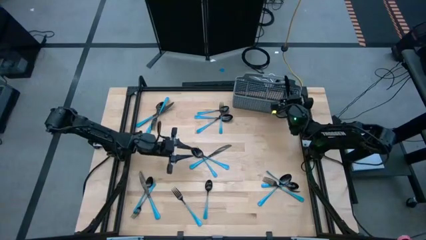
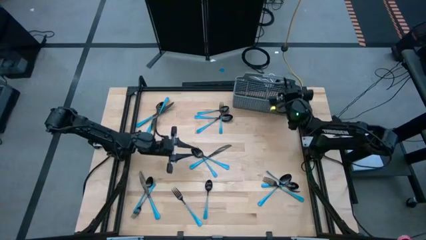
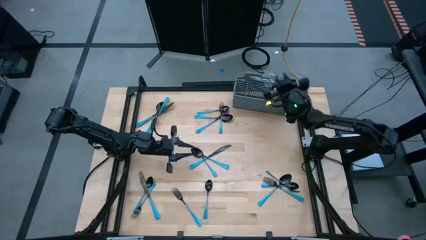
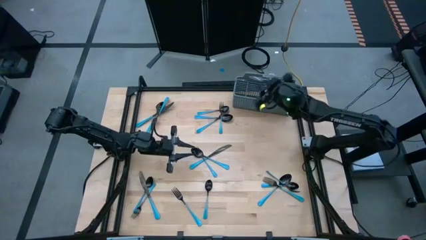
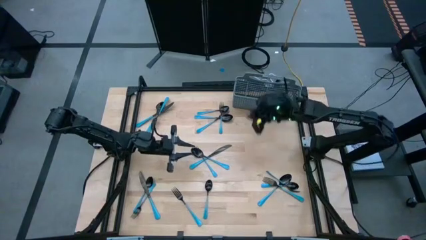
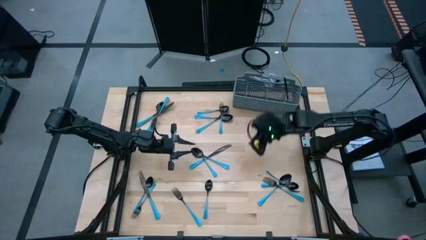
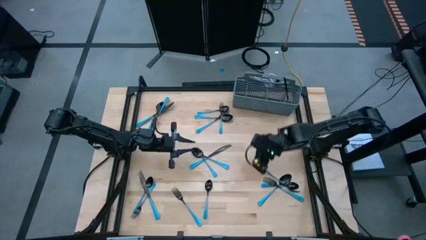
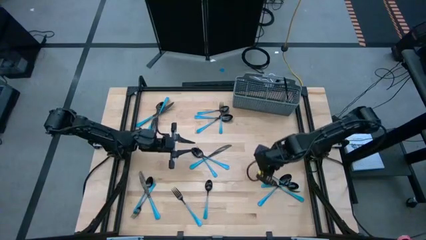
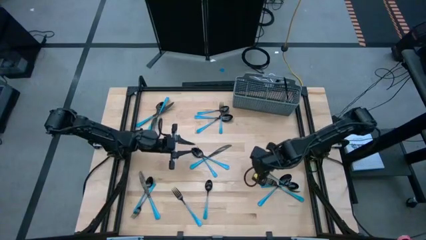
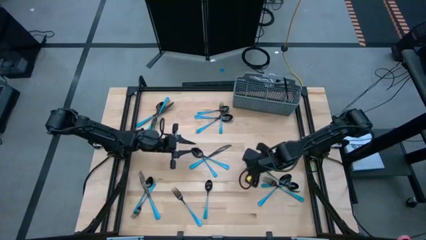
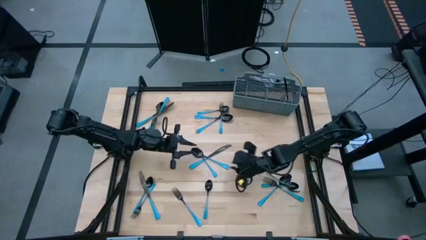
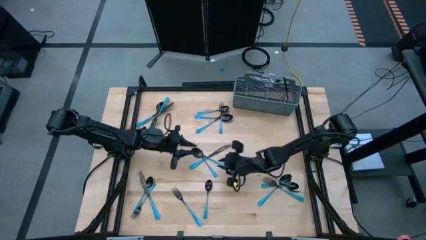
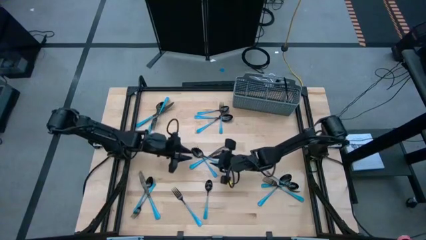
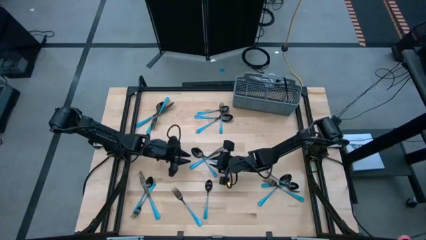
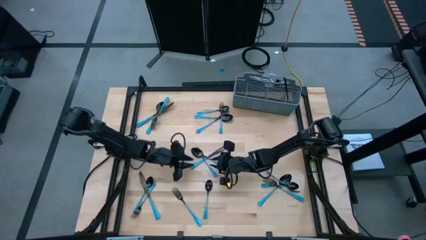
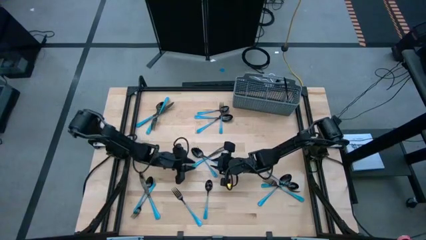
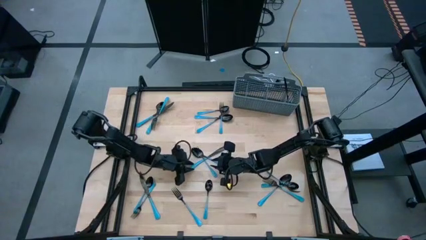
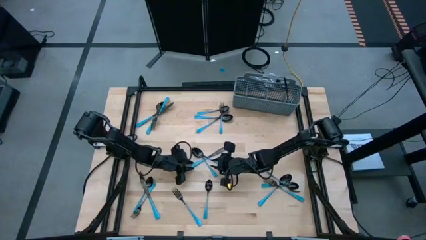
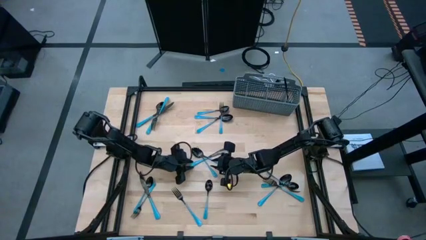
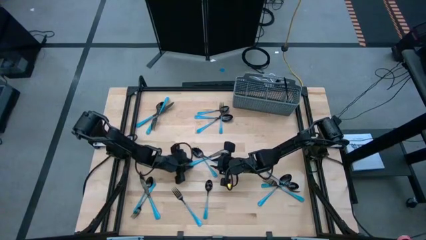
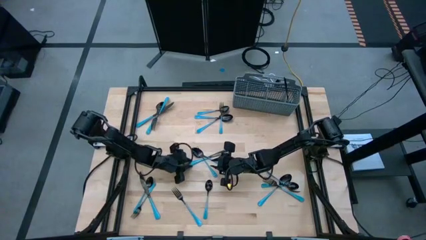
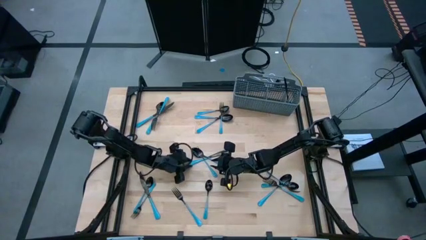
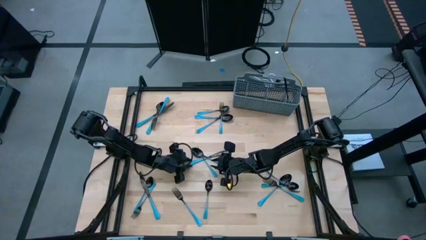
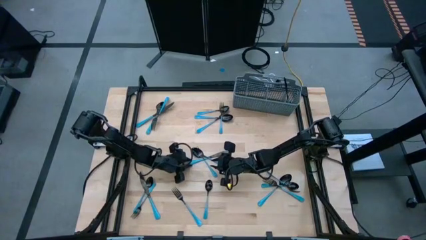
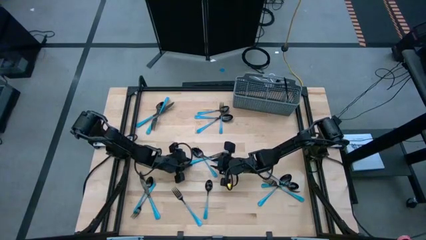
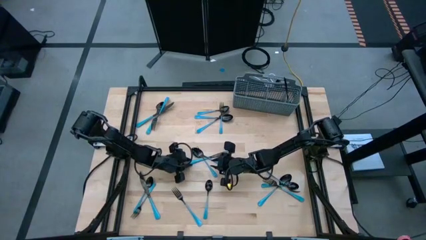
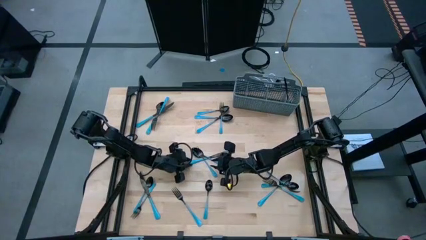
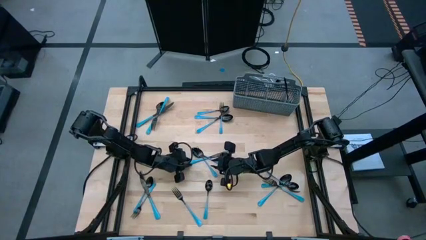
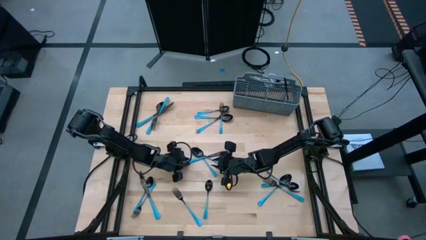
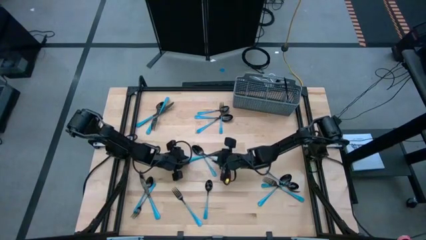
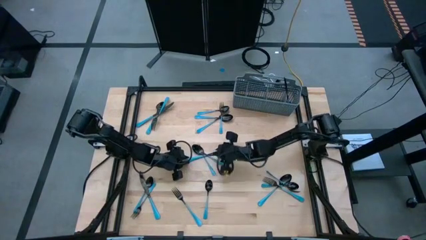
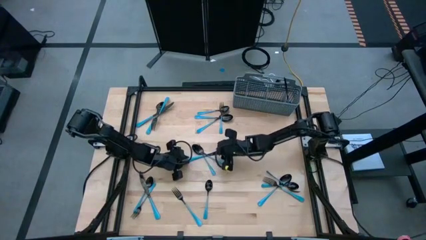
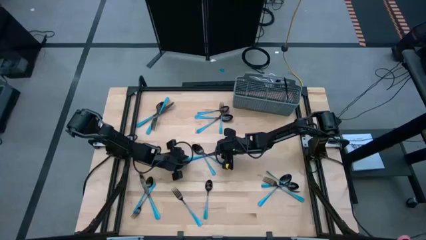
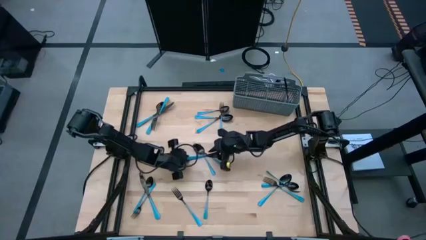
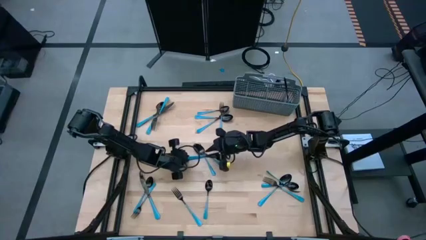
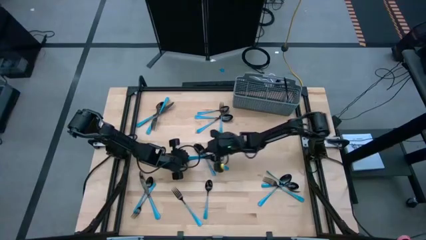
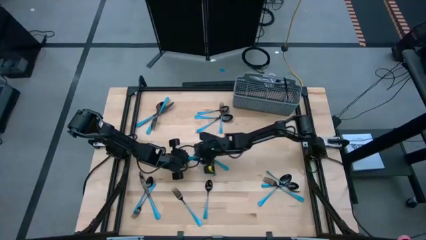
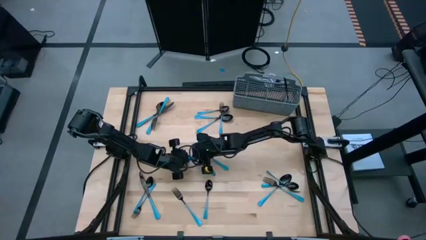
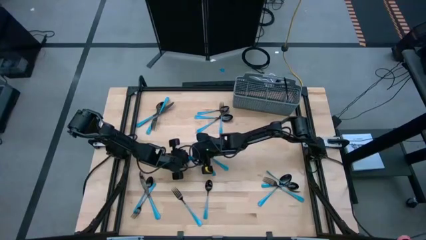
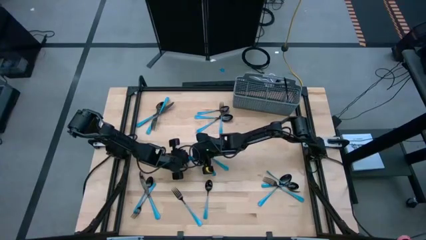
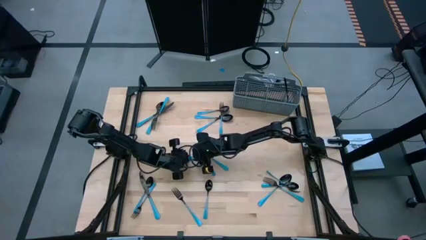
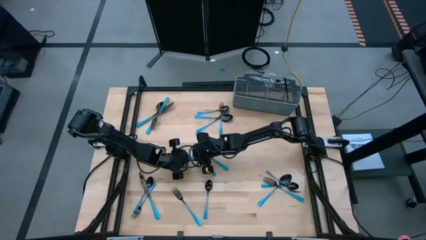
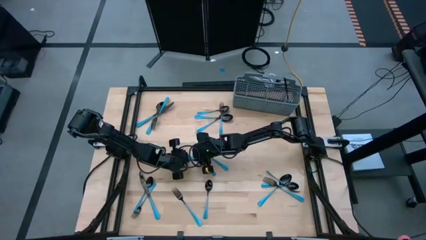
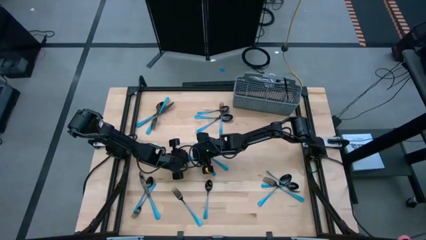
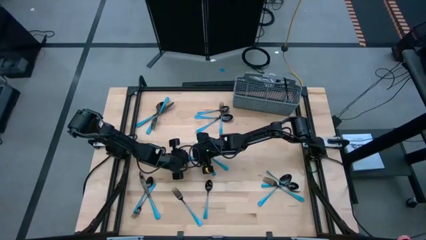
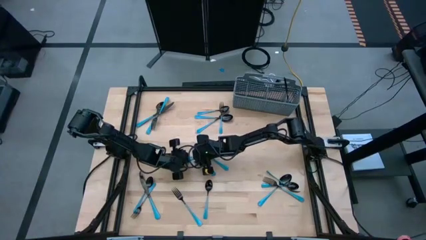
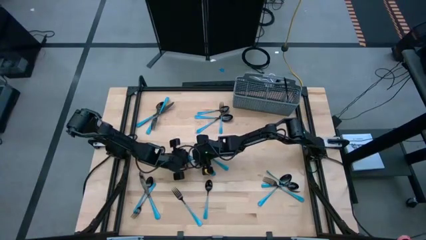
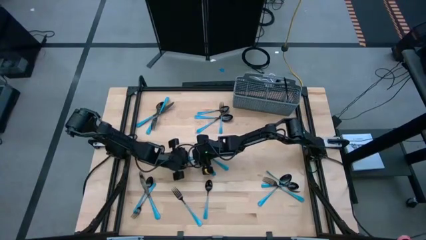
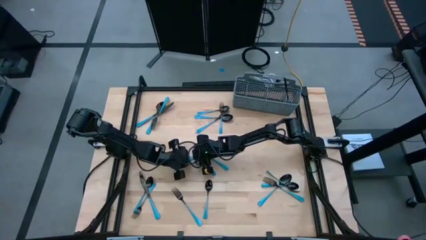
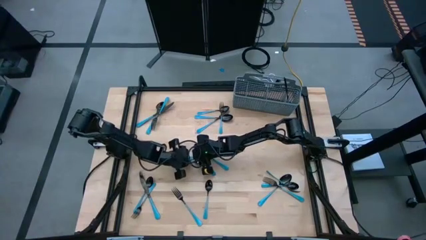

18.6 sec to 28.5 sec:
Task: Sort silverware
Put the blue knife into the right of the blue utensil organizer

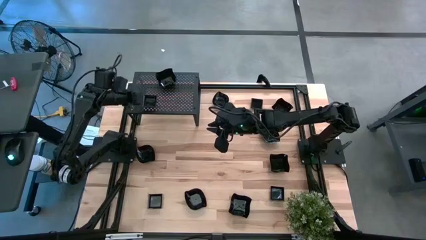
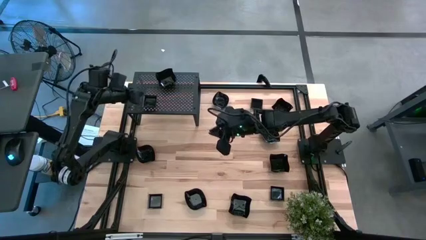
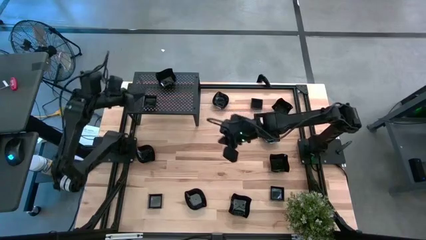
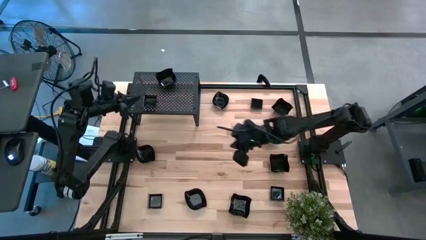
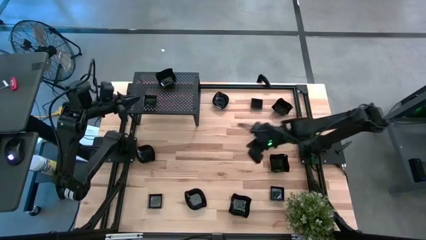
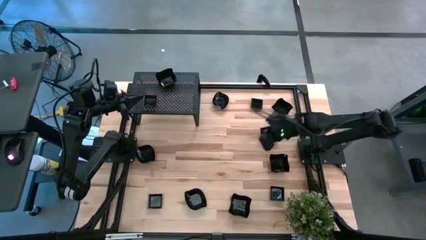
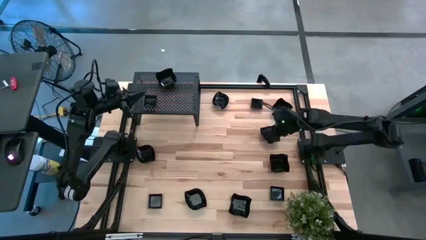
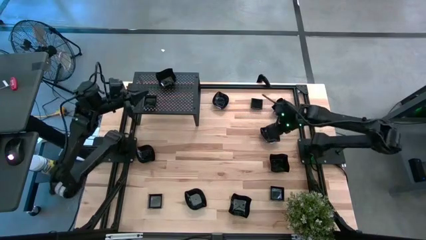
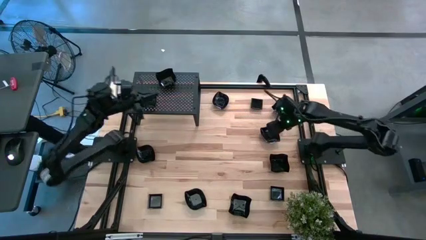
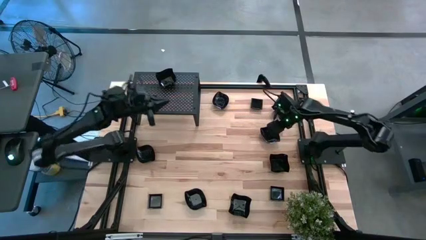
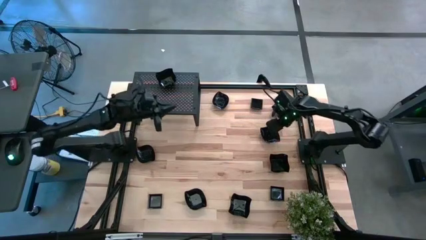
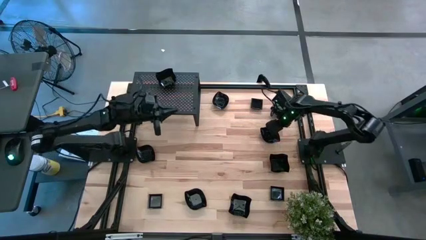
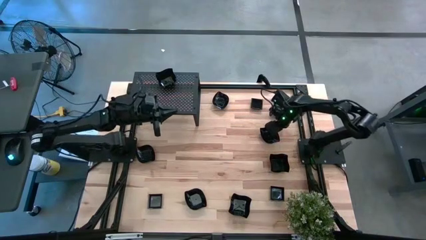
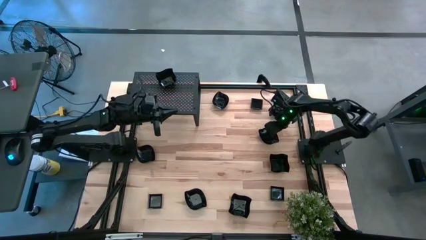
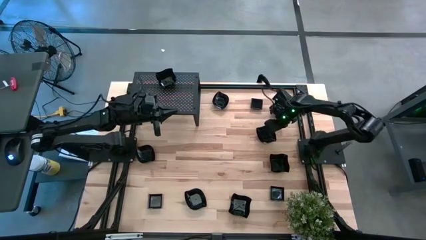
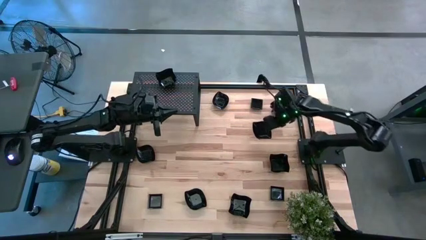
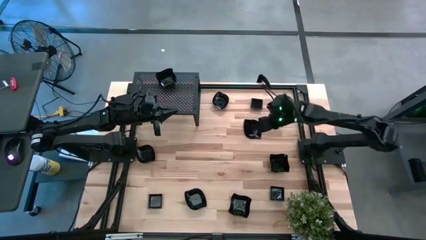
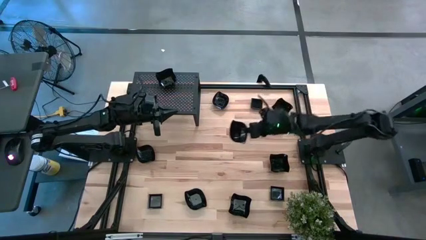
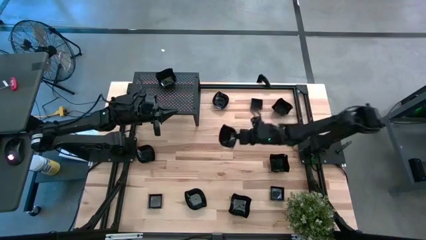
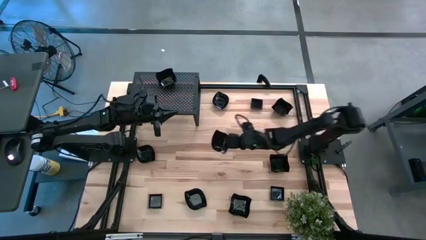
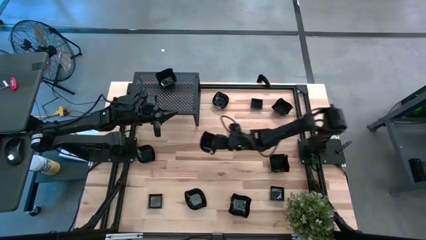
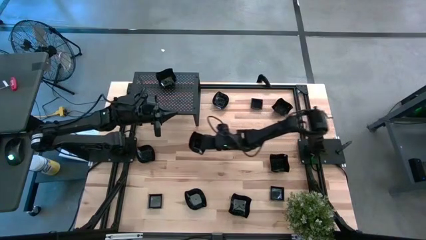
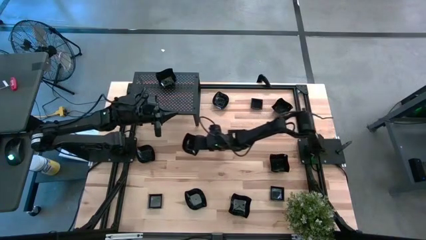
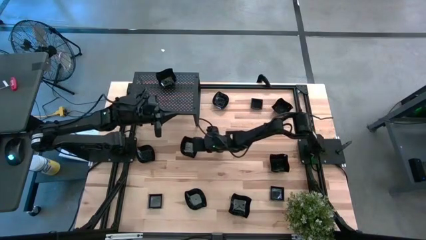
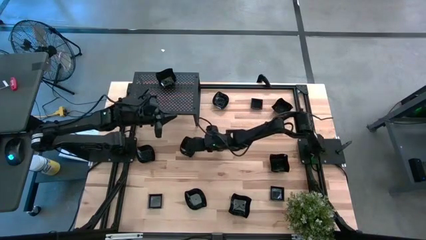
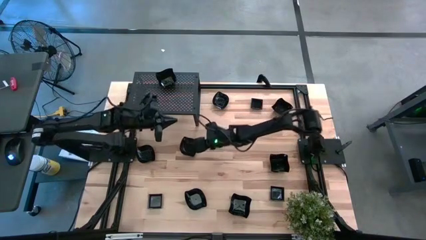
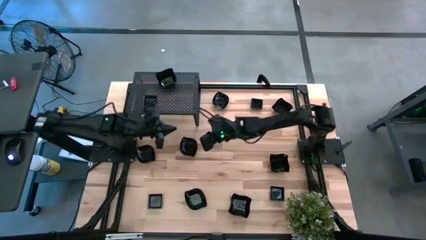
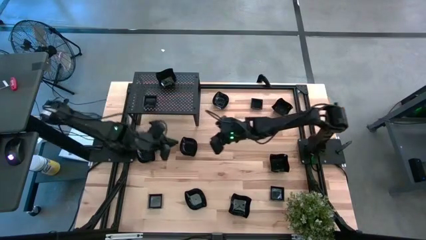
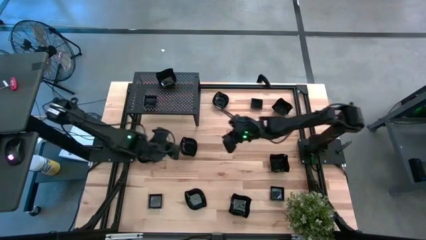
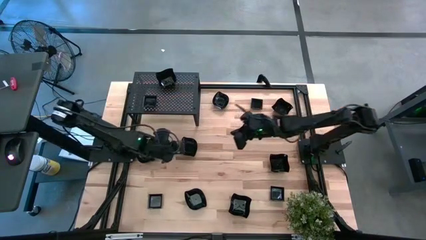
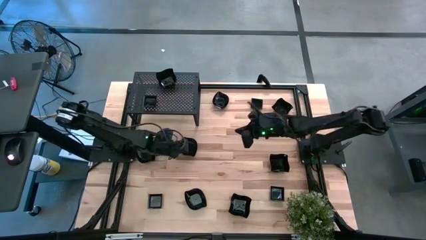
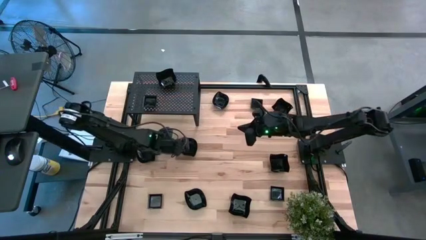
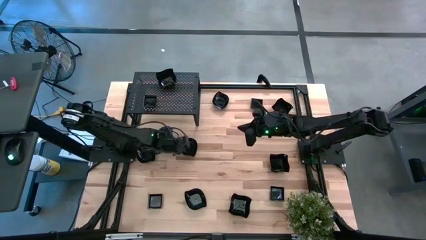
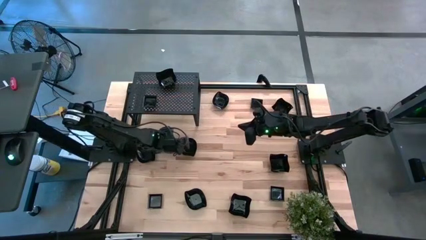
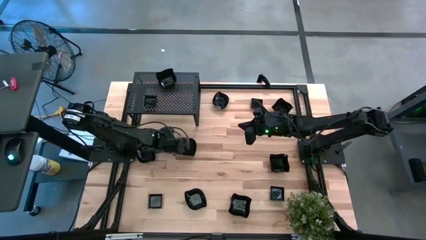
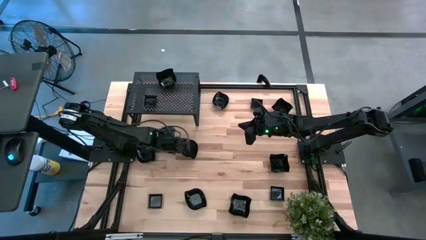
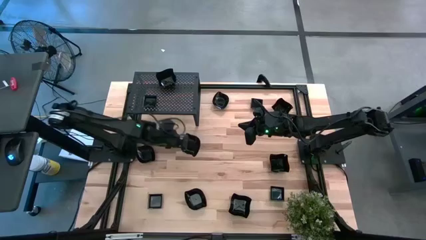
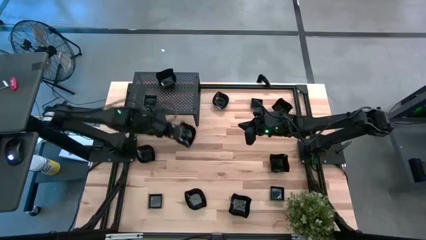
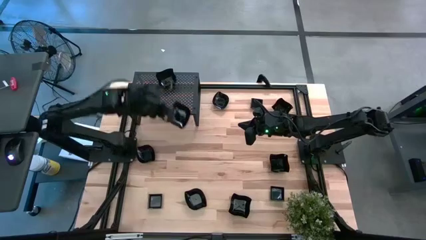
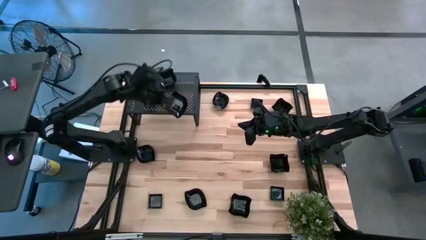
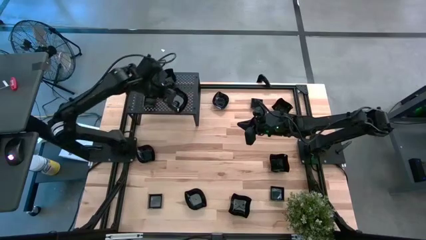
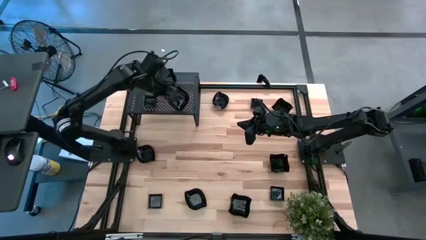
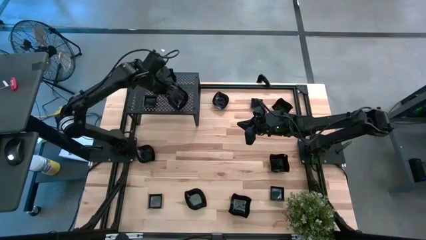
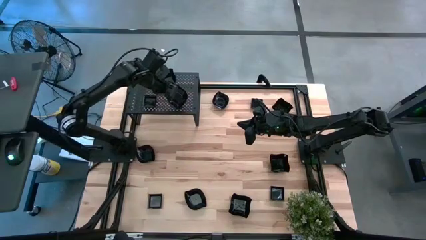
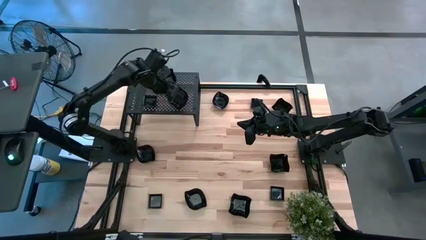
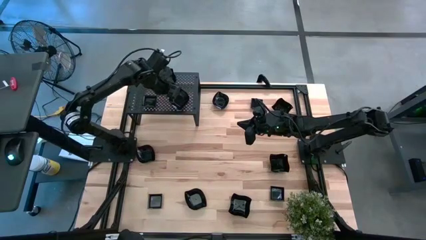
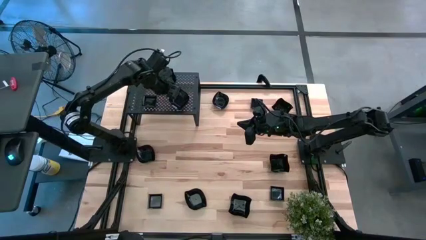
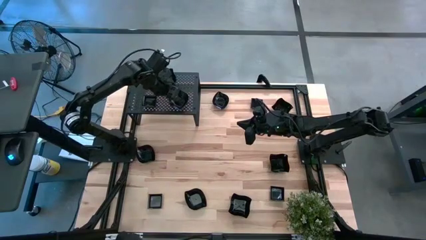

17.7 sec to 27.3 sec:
Task: Pick & Place Mini shaped plates
Put the black leaf shaped plate on the shelf
